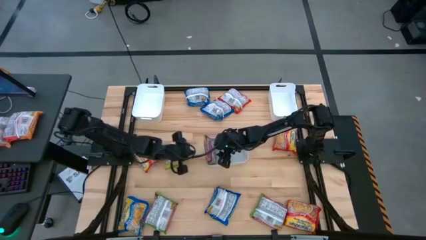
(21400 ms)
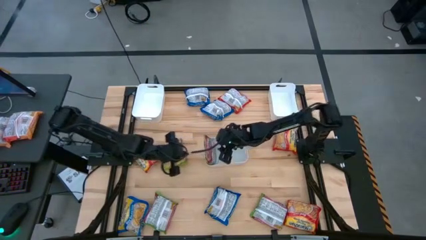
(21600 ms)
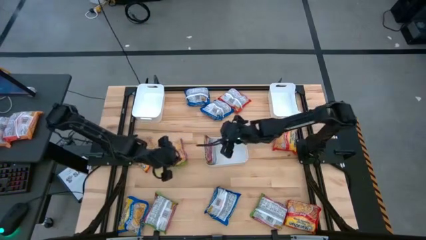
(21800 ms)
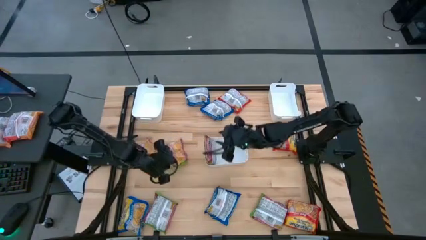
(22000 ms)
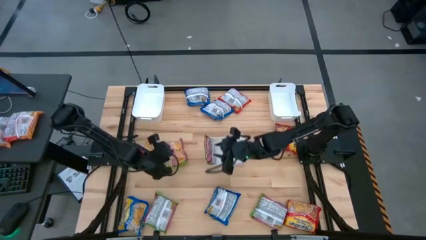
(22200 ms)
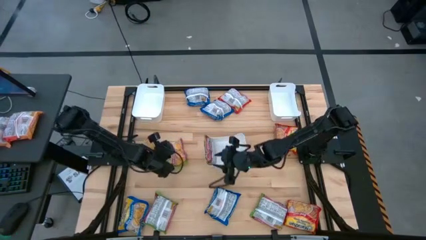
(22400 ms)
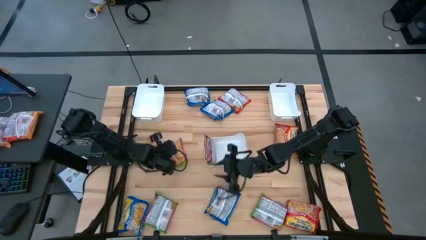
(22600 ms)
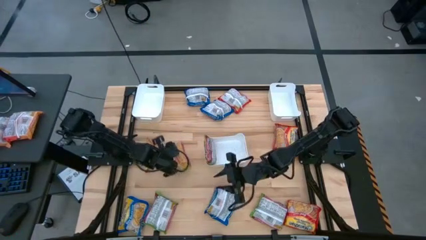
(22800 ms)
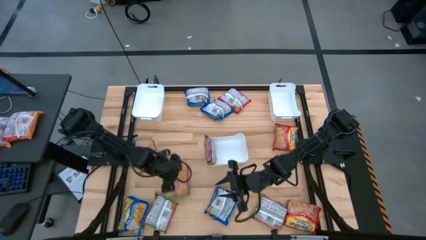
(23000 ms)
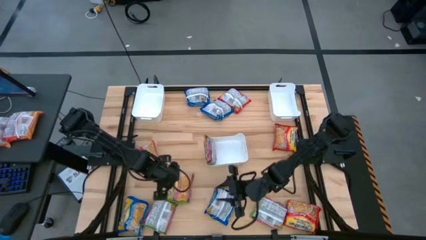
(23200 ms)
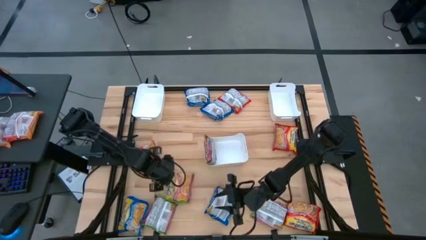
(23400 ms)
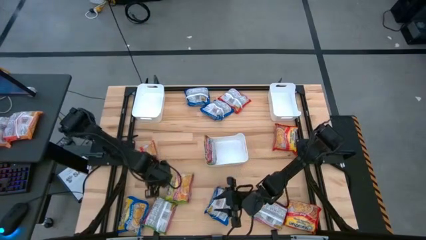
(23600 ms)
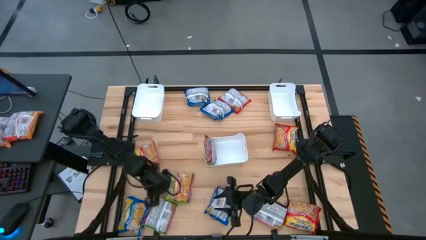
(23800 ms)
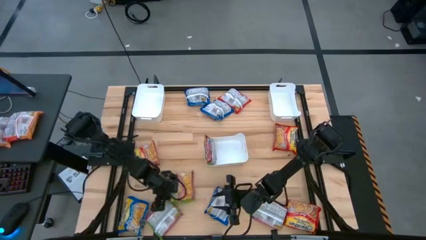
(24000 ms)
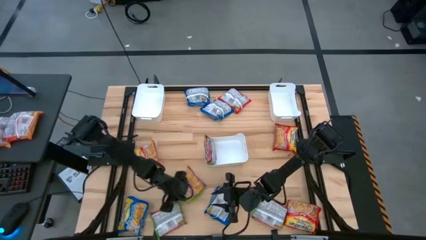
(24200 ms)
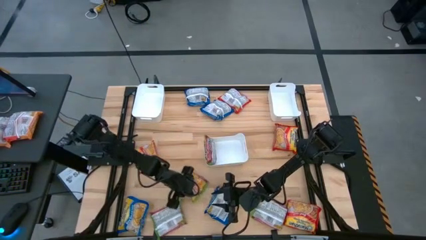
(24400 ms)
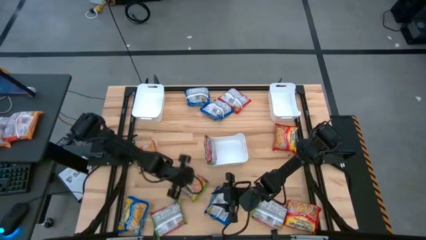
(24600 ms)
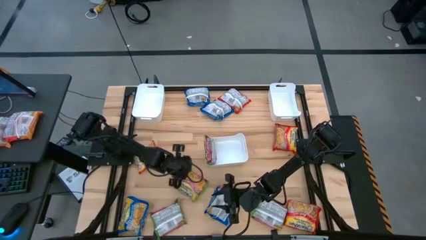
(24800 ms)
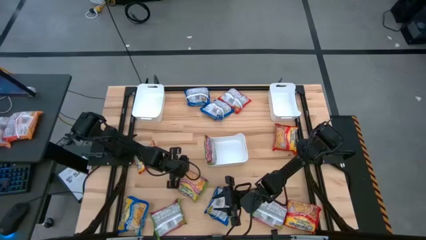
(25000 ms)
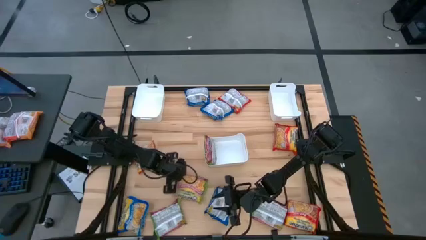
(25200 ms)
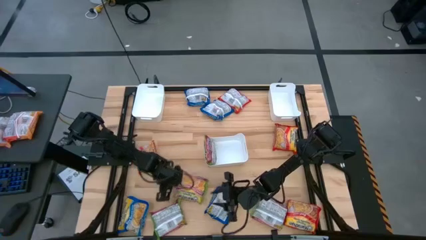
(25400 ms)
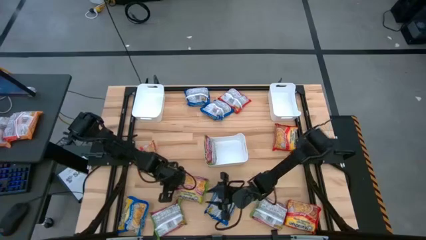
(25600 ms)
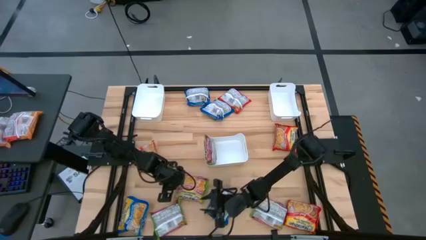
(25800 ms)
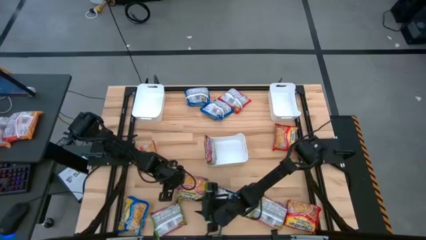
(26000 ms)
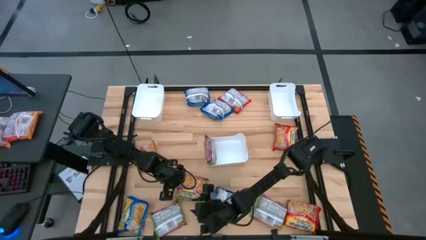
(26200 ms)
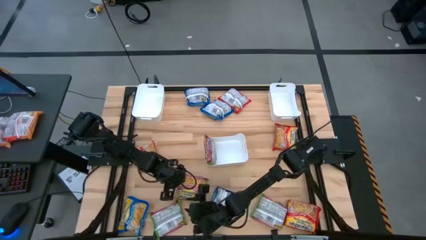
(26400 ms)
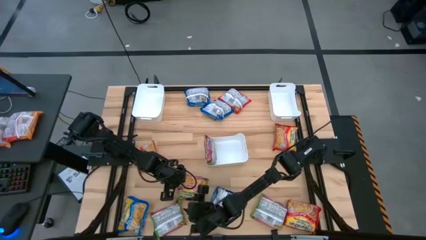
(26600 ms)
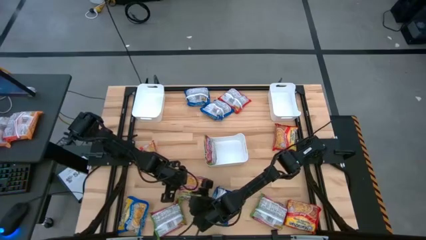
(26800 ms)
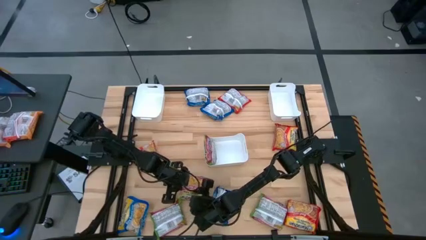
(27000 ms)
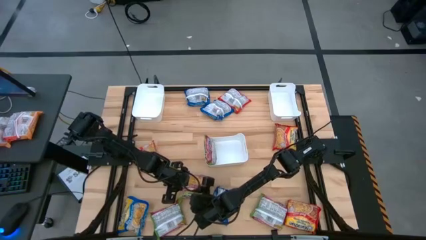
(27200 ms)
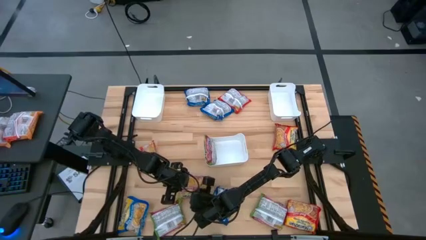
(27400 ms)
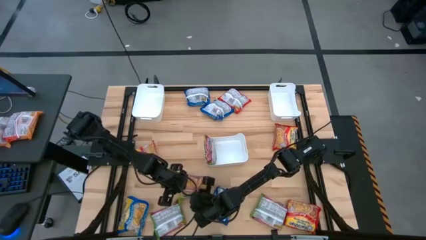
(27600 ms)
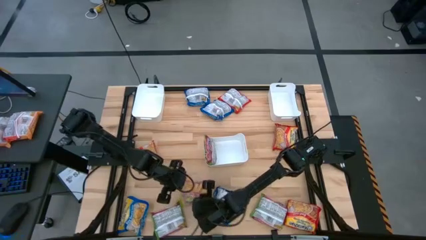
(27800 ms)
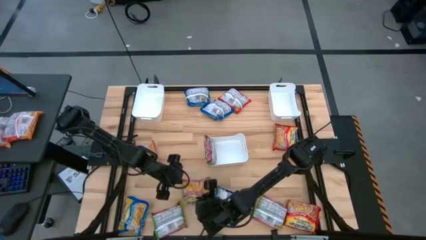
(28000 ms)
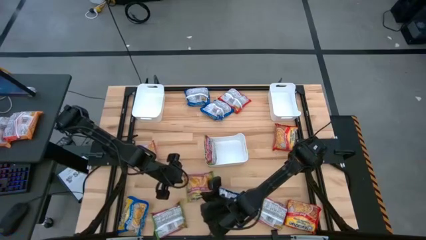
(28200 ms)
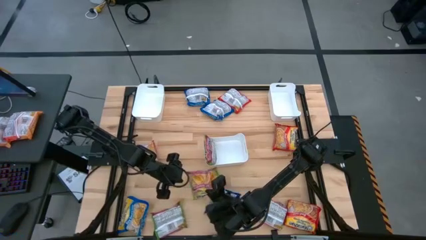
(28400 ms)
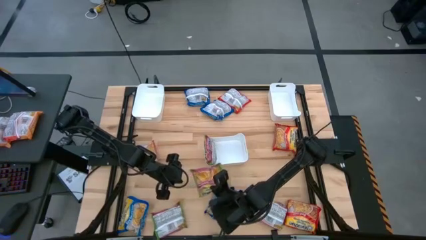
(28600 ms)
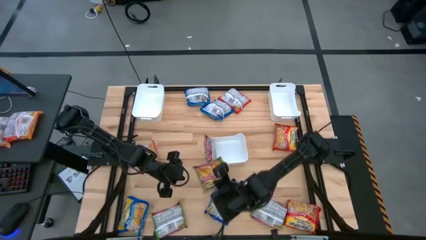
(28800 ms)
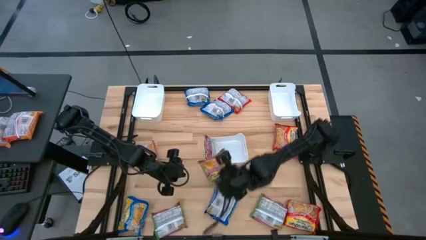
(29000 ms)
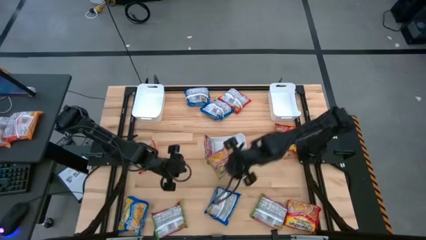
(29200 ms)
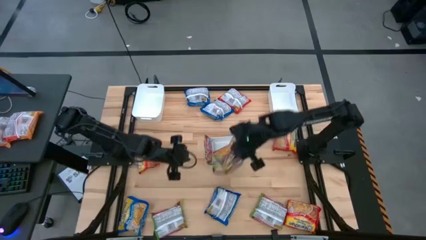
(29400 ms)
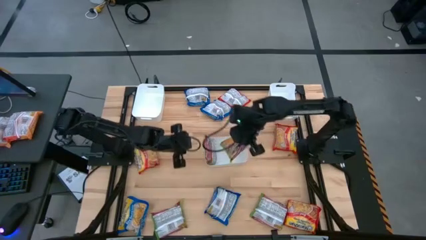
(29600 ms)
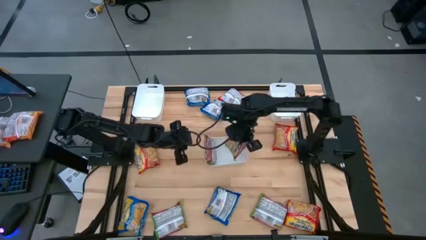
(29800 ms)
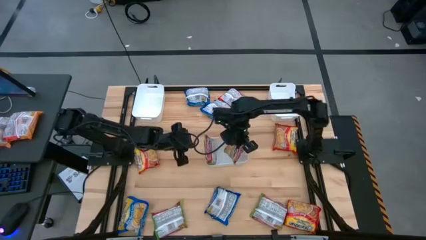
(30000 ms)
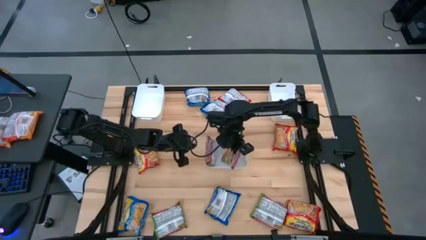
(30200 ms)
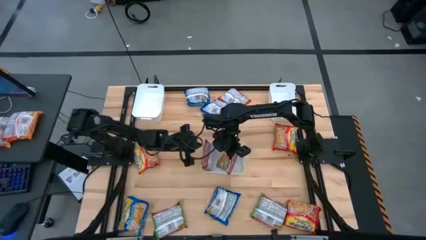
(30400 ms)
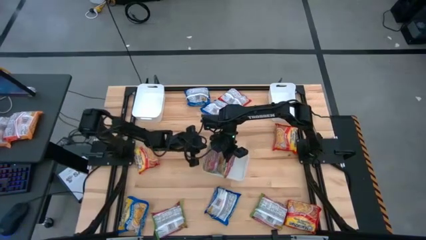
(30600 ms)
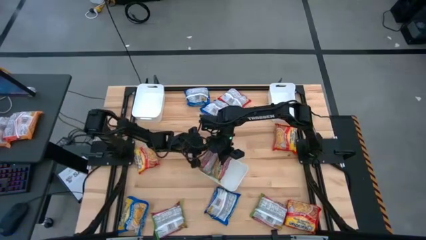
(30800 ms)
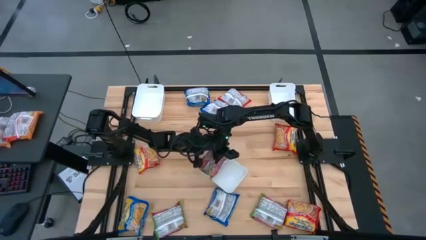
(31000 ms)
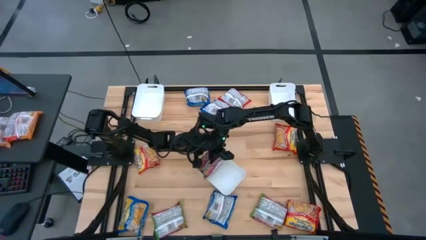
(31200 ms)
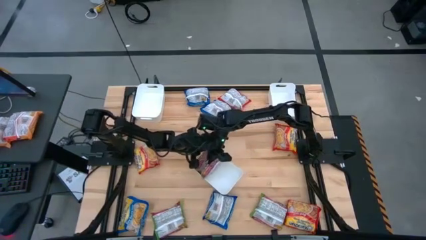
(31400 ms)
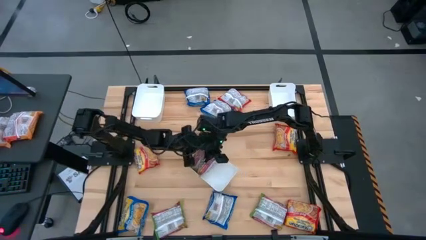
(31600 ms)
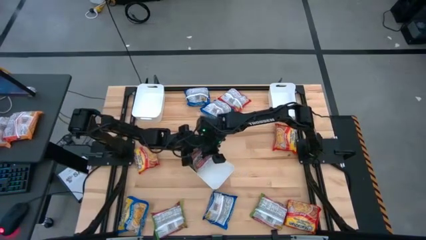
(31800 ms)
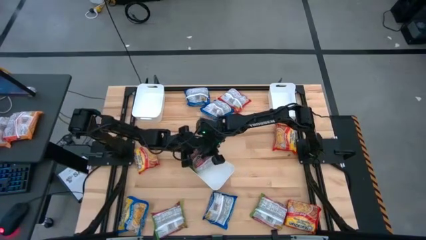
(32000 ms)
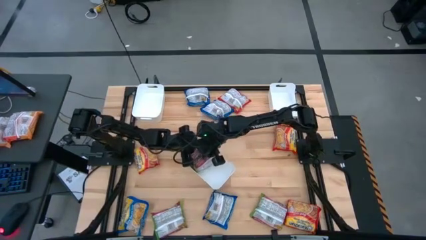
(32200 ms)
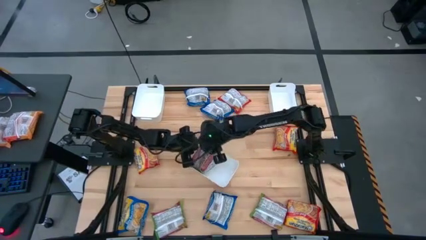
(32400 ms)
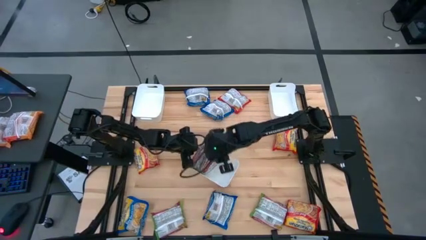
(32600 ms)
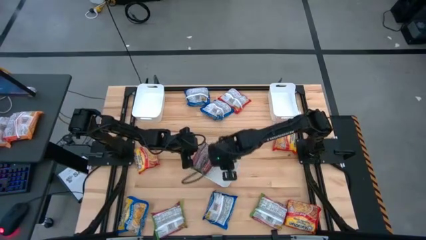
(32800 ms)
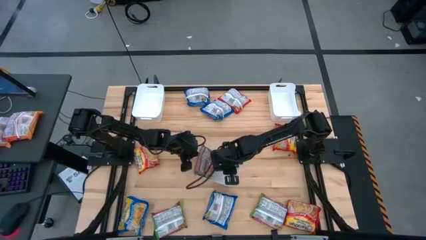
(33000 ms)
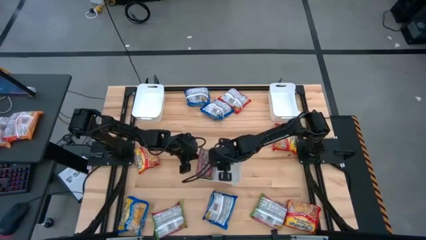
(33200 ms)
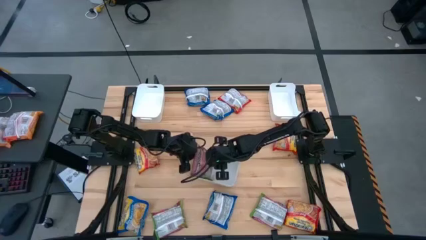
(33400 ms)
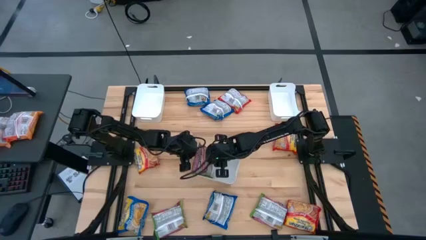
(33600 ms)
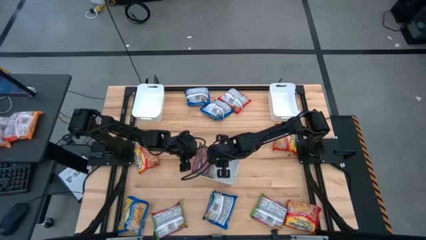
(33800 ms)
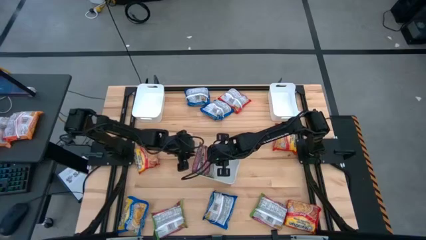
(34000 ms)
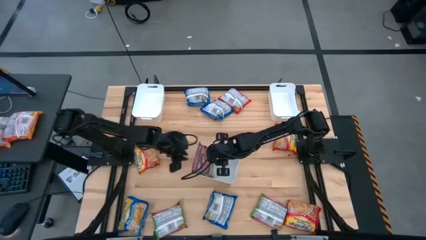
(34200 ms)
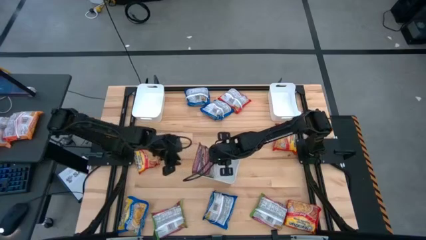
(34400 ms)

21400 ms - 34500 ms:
Task: Sort Maruchan noodles
Put the green noodle pack into the bottom white bin

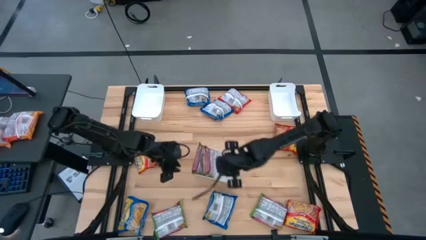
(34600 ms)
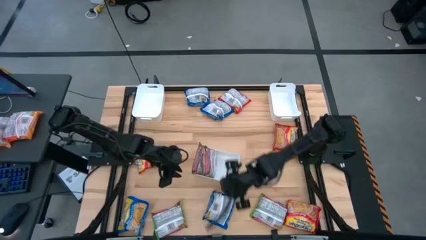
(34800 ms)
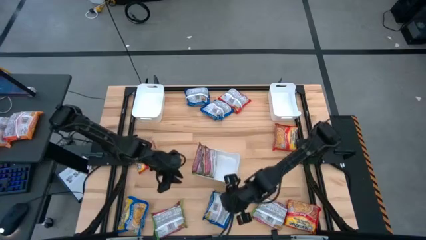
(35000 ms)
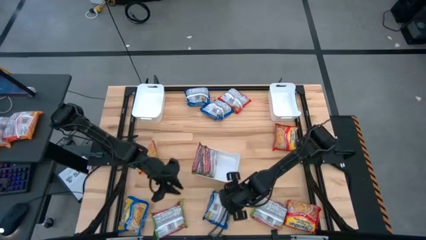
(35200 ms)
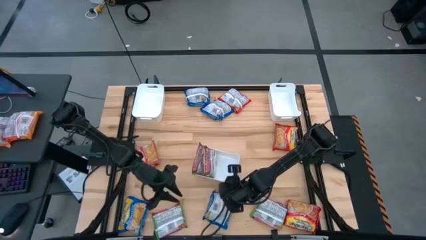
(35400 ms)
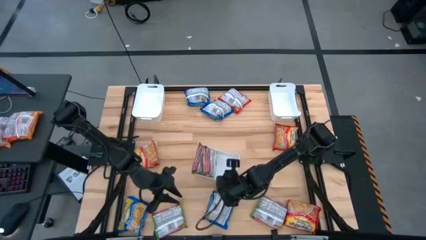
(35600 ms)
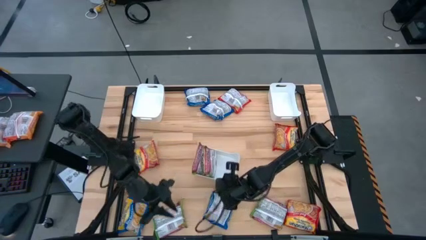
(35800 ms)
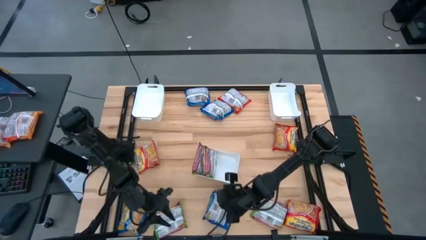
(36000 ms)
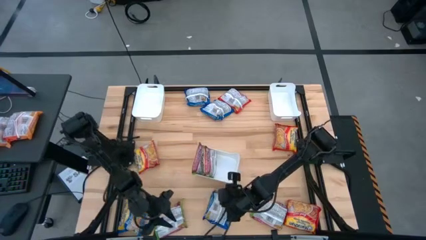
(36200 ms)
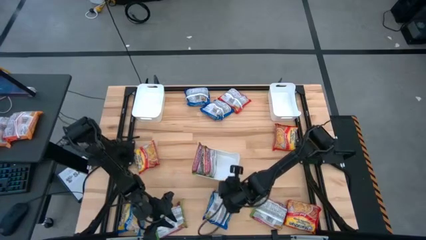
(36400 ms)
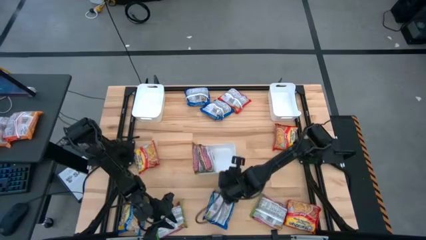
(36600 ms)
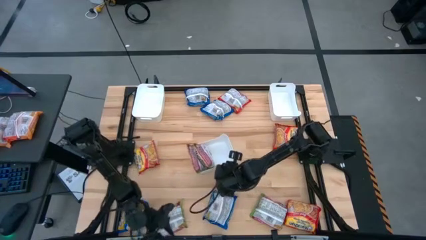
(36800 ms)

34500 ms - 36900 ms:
Adjust the bottom white bin on the table
